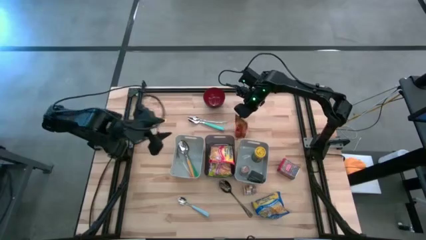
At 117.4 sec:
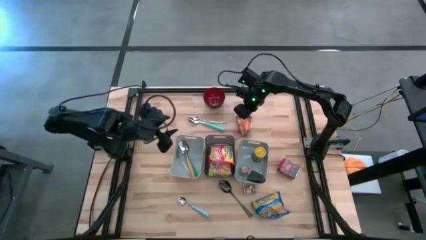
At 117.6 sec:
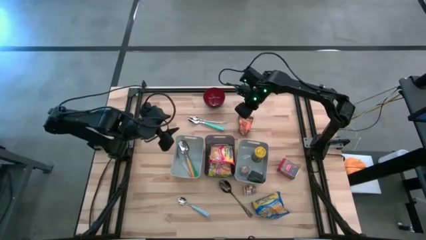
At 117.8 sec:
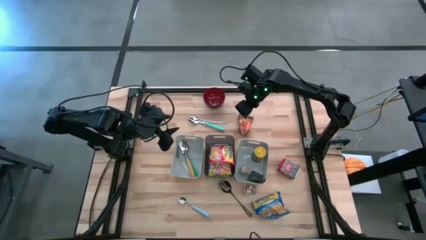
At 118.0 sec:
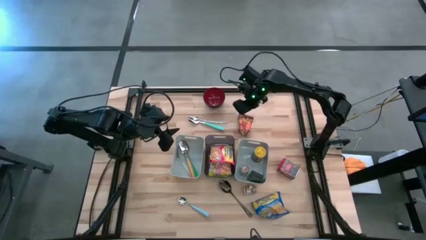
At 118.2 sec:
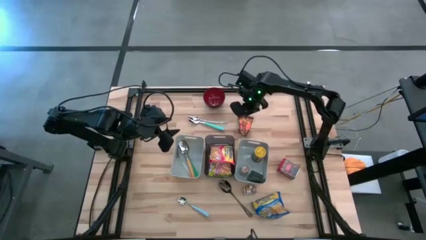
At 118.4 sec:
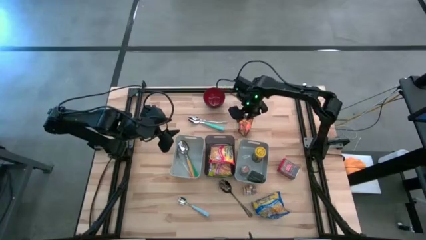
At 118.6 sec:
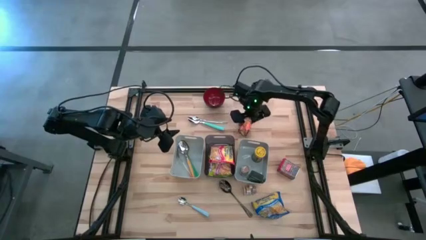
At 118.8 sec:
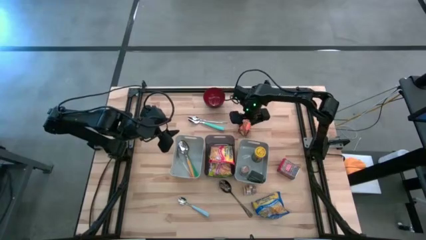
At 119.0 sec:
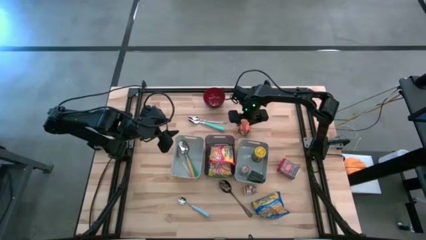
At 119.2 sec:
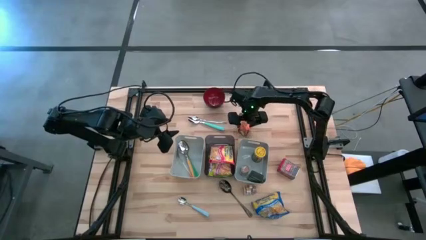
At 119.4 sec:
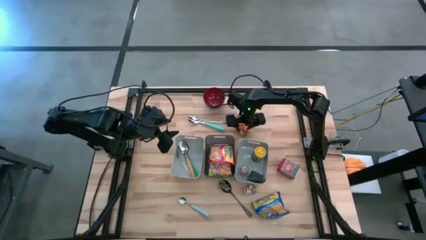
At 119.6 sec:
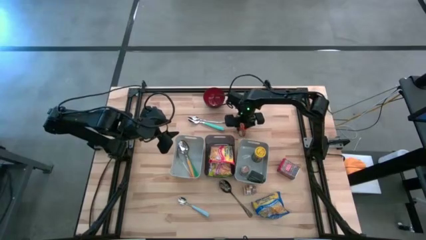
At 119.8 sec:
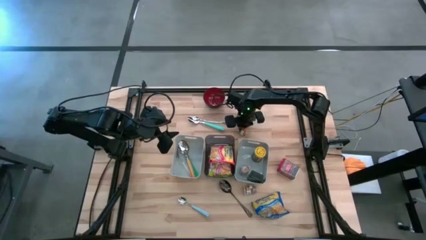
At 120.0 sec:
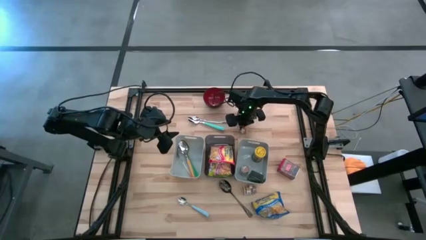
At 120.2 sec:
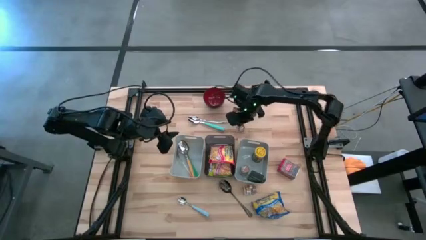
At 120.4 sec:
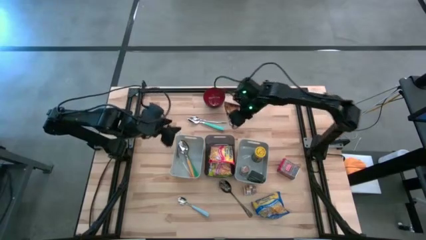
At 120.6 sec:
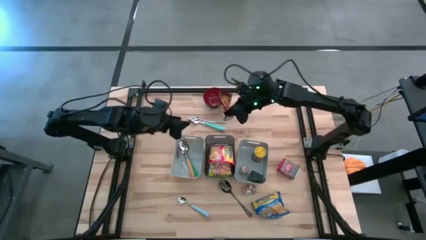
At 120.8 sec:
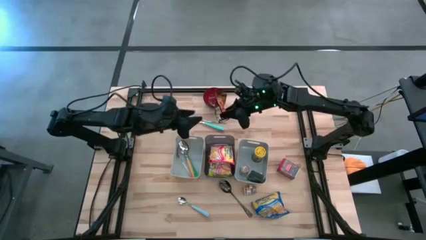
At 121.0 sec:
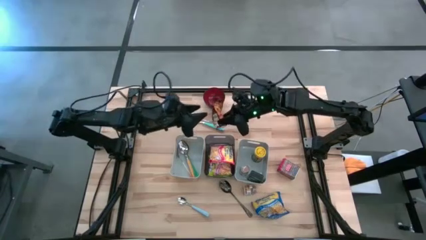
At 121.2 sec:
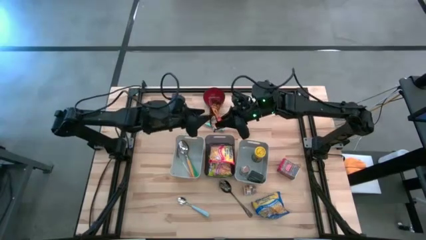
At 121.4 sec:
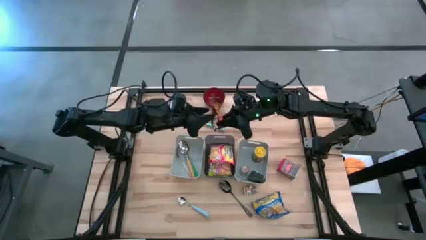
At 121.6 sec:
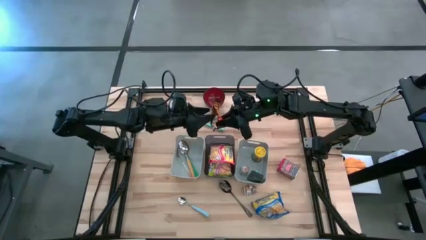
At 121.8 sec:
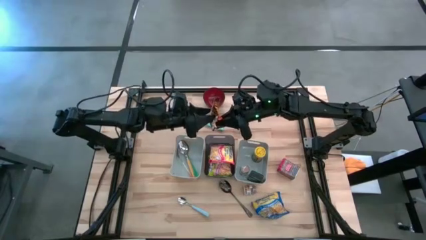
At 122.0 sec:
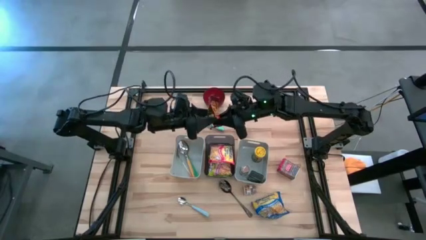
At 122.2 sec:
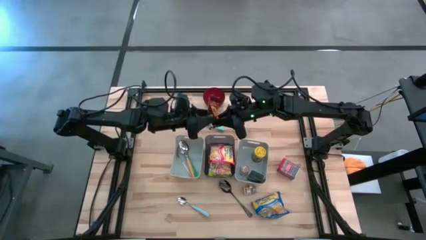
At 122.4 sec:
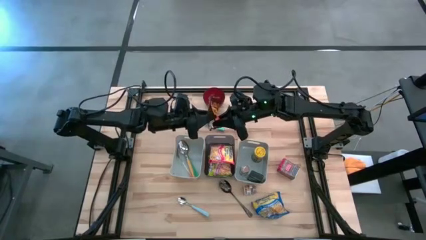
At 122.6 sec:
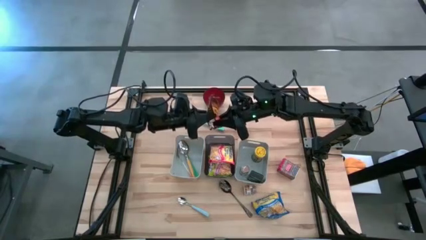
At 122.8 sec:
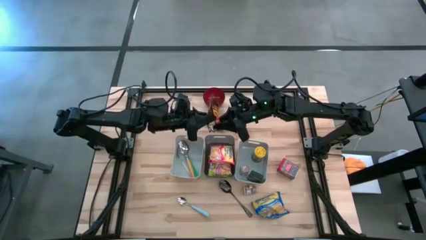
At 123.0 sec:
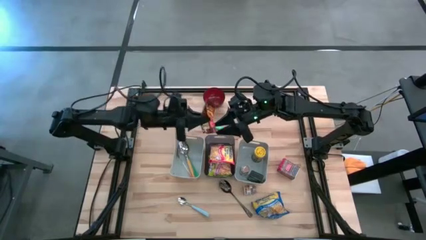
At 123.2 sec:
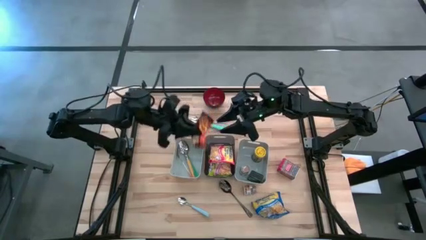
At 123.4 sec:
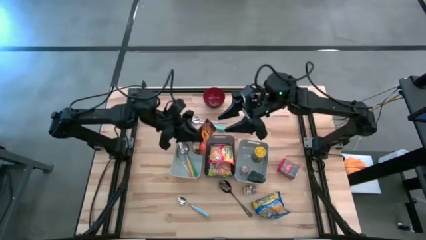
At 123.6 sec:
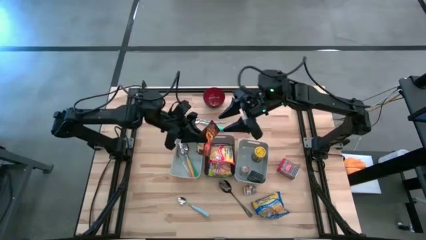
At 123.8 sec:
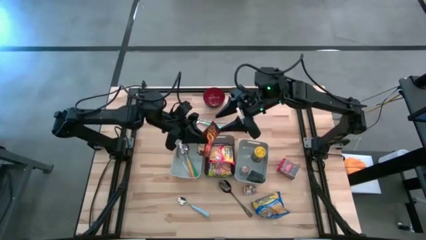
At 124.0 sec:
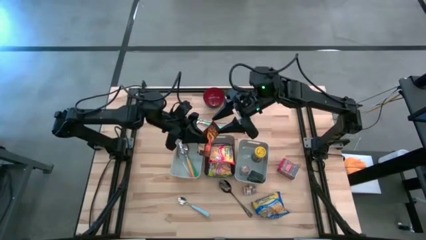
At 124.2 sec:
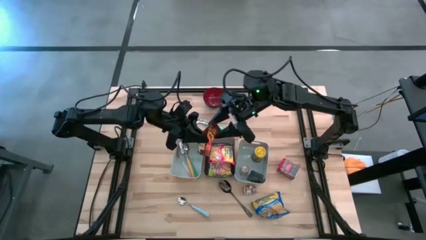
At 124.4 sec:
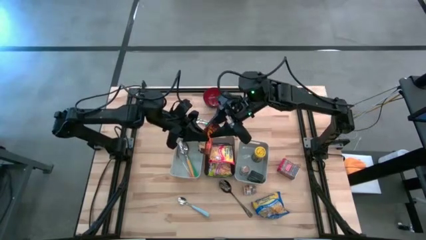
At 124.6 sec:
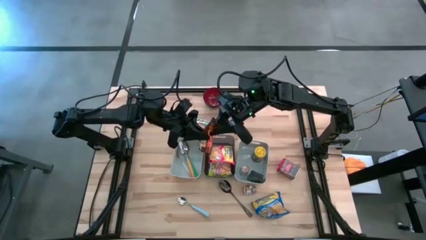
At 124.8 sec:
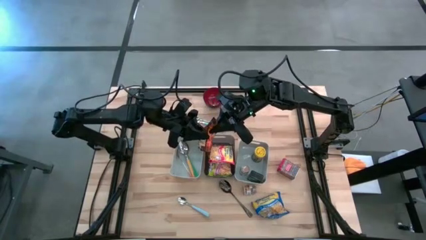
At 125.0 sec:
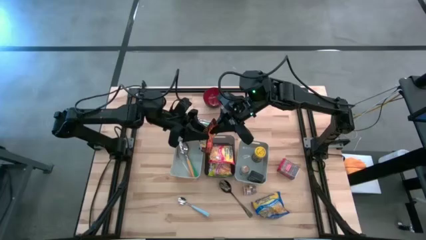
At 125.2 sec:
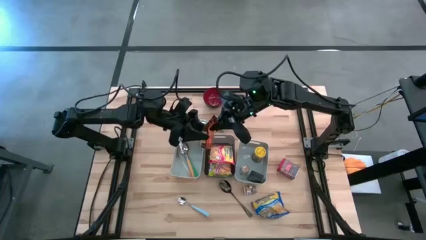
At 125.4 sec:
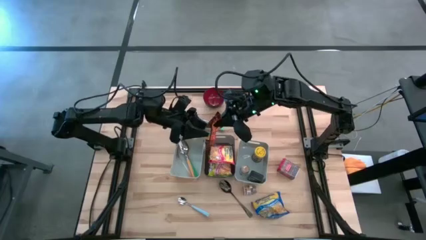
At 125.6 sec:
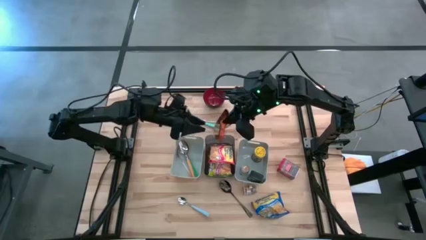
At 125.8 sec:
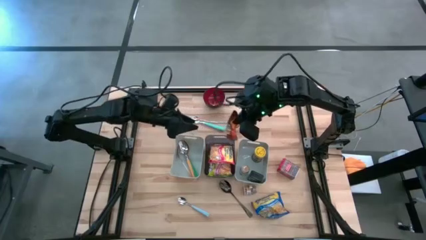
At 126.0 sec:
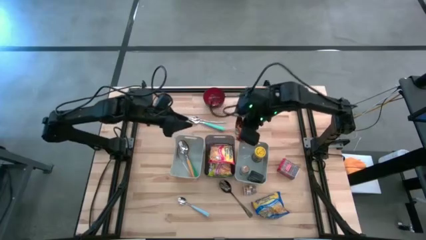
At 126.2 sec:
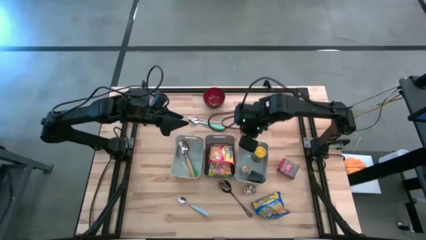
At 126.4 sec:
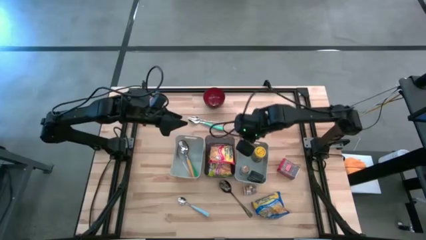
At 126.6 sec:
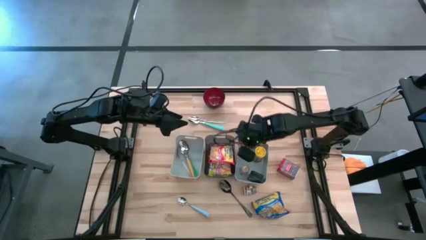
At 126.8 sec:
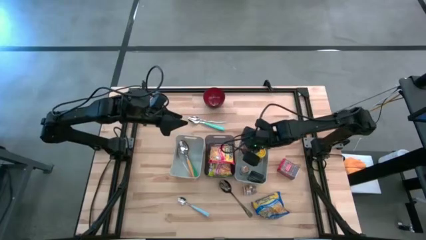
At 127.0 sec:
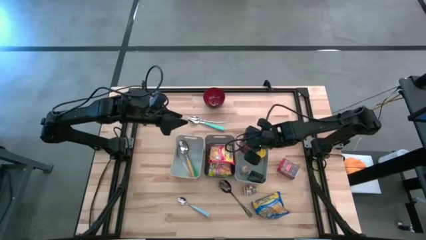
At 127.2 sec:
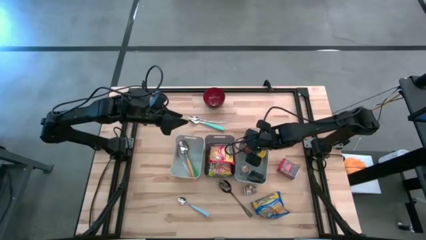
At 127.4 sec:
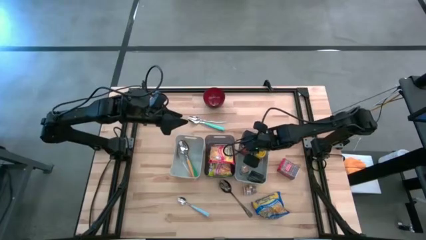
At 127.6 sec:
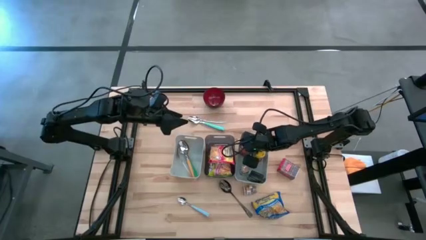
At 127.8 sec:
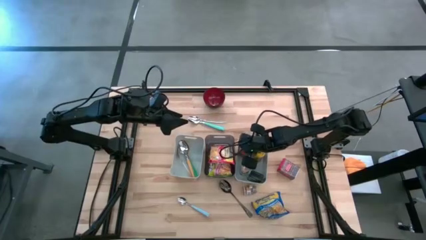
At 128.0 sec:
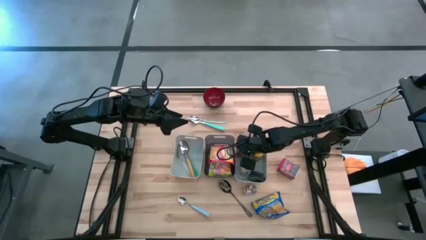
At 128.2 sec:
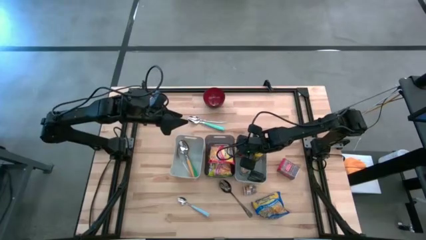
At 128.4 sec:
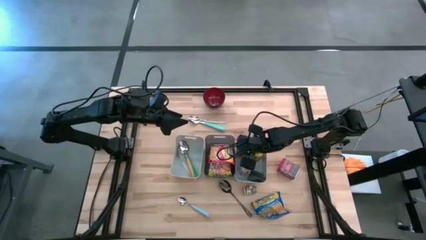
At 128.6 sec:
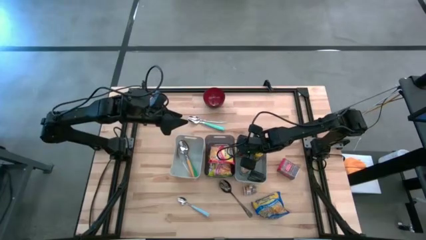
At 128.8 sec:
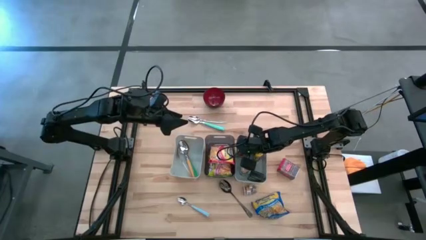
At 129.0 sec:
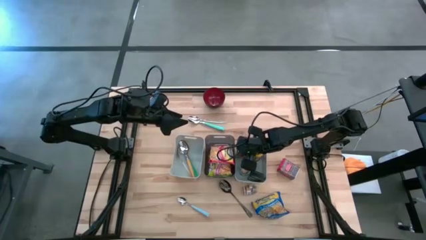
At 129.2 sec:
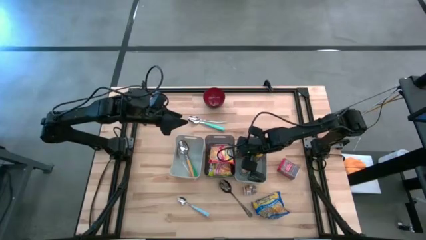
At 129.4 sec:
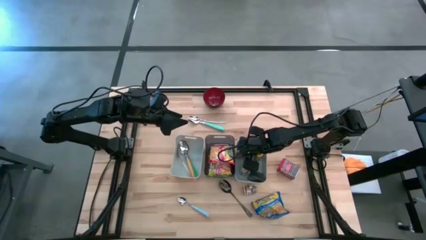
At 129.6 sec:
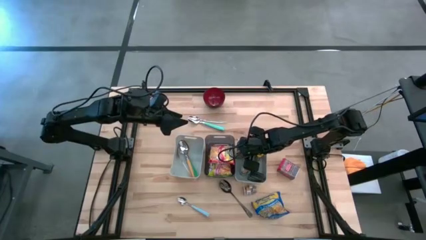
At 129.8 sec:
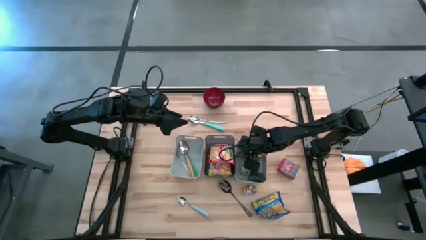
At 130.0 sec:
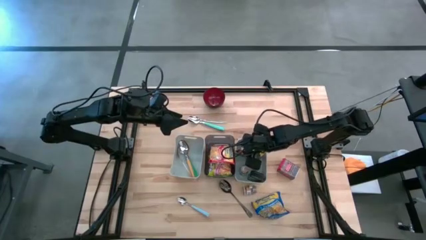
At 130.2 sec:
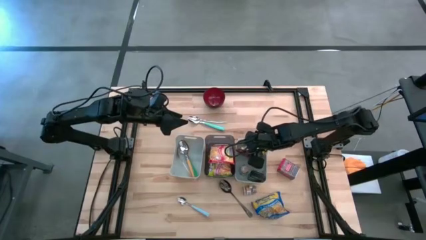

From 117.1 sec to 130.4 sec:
Put the orange seasoning pack into the right gray bin
